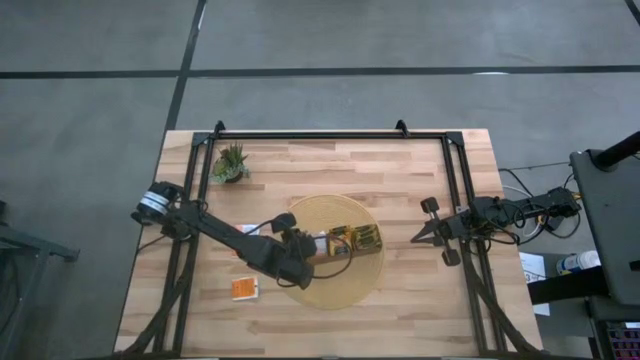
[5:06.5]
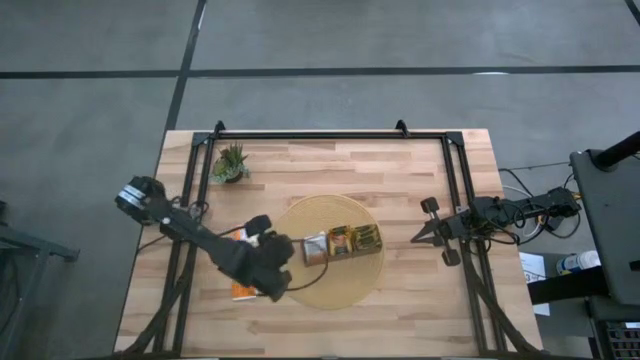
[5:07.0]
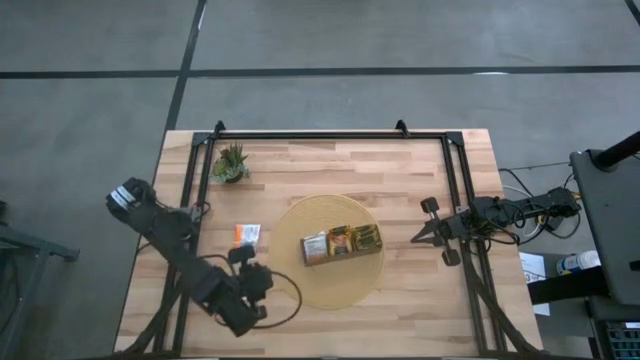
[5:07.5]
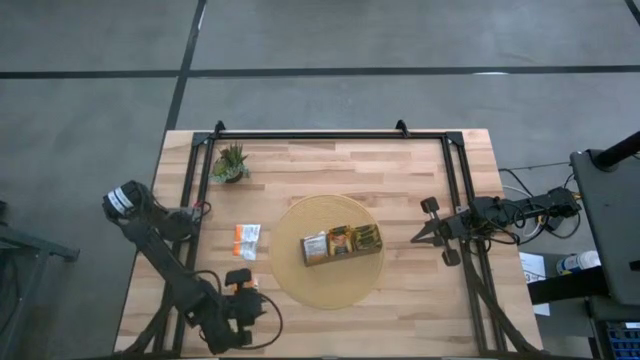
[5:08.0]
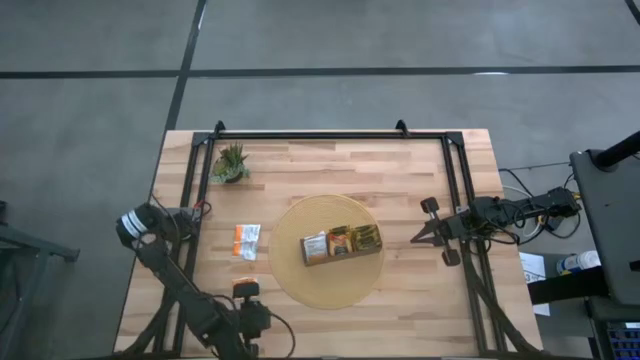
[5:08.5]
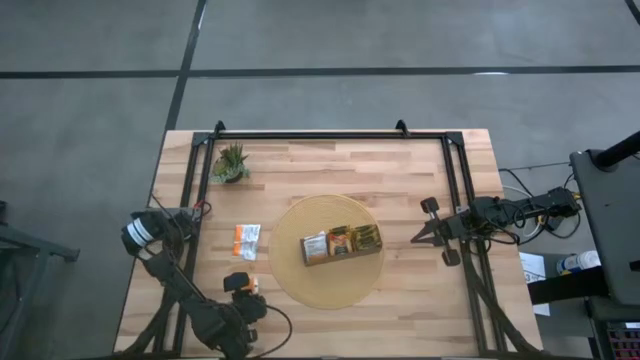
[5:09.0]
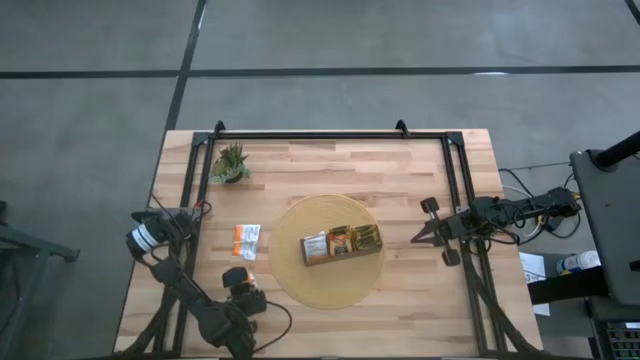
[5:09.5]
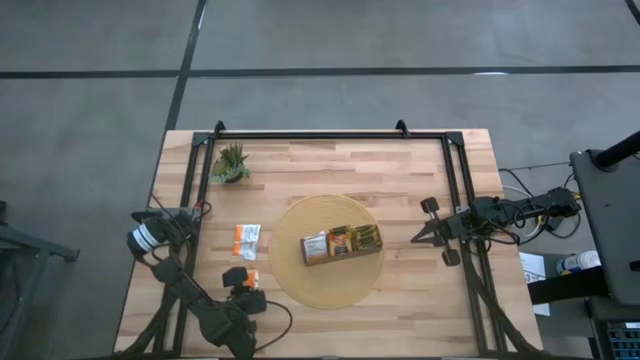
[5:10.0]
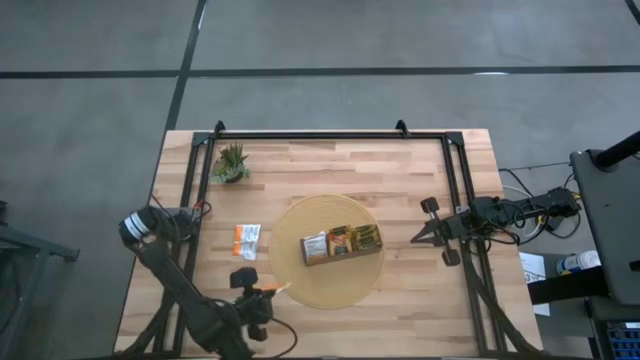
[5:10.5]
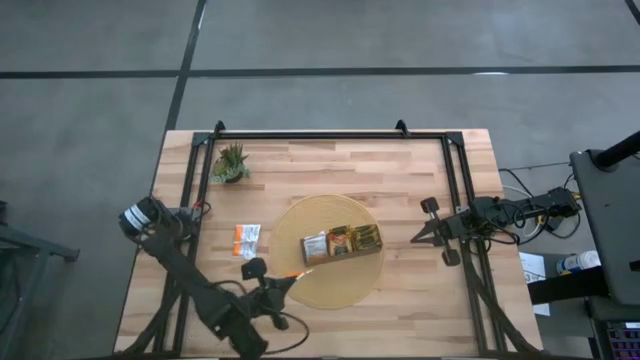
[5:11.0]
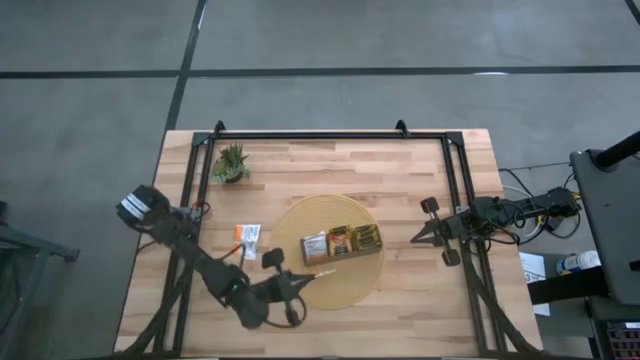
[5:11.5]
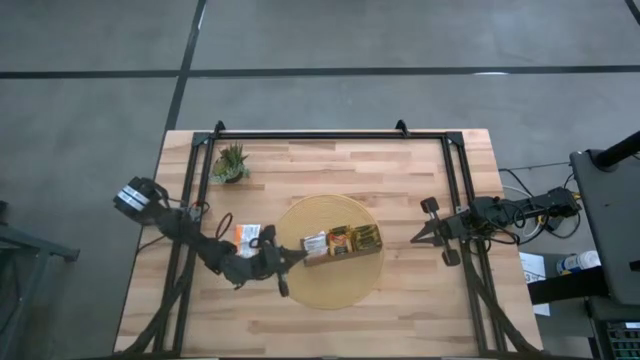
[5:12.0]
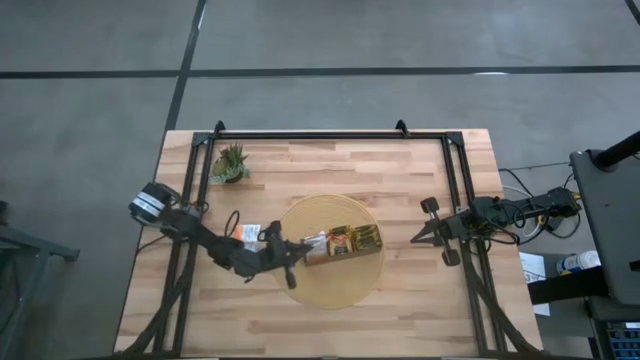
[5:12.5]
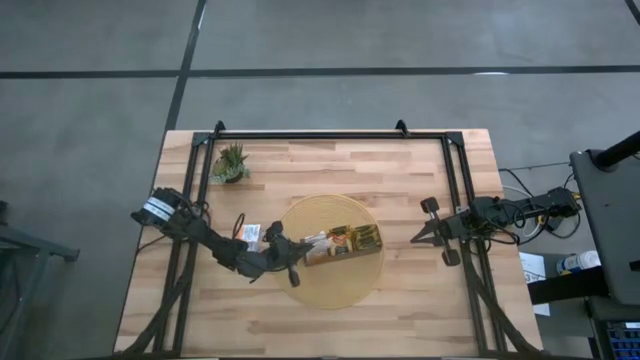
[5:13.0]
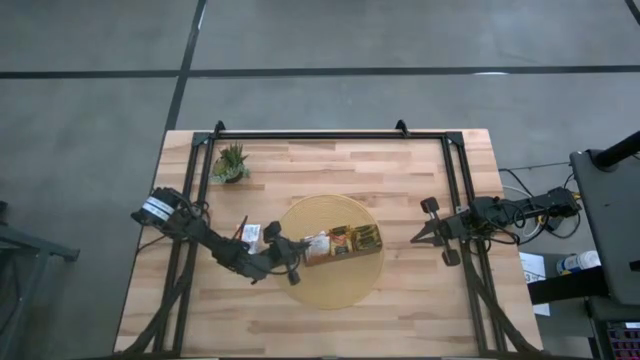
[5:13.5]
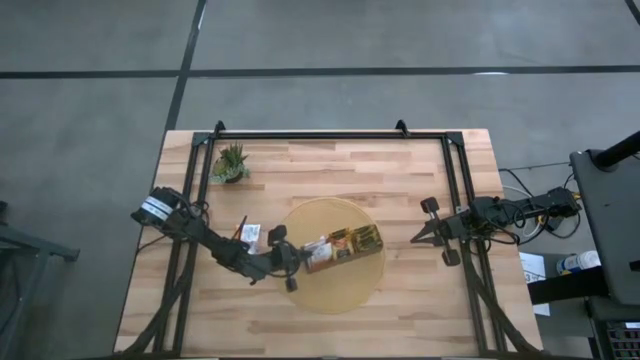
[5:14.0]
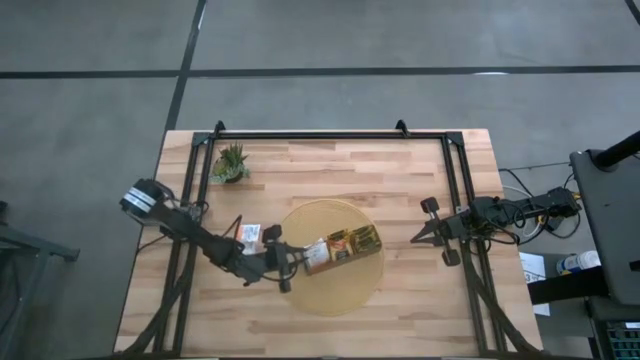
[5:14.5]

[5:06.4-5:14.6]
Task: Pick & Place Tea
Put the bottom white tea bag into the left of the wooden organizer

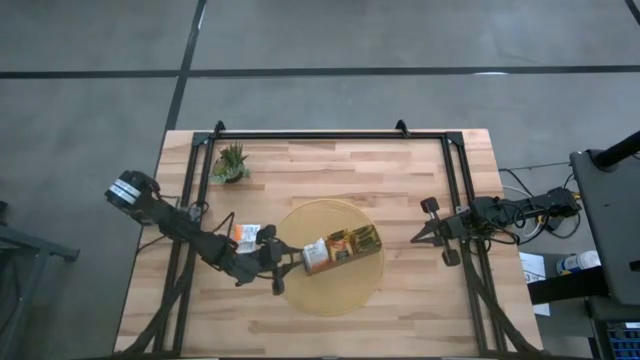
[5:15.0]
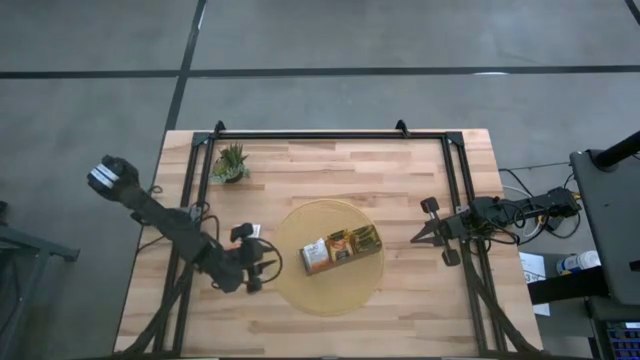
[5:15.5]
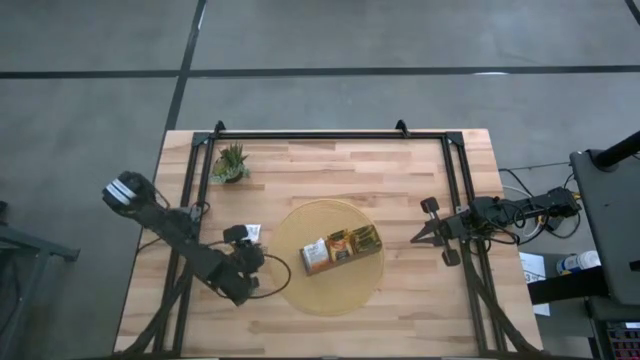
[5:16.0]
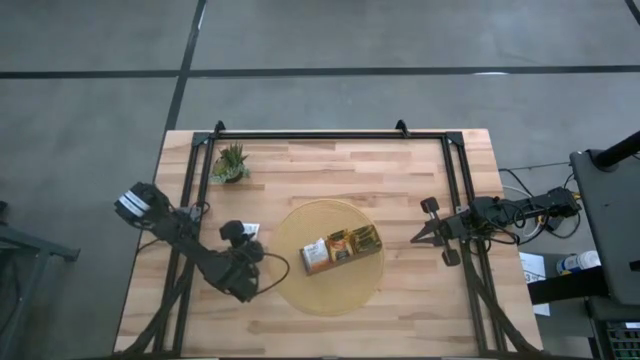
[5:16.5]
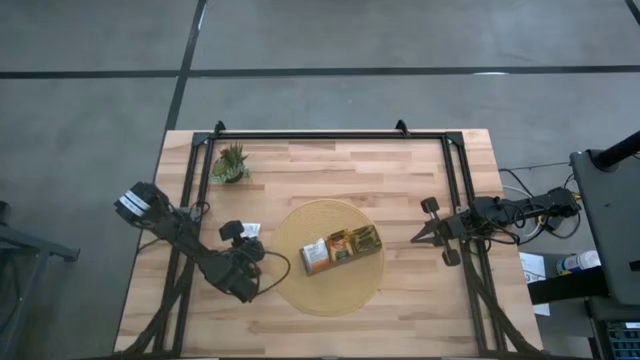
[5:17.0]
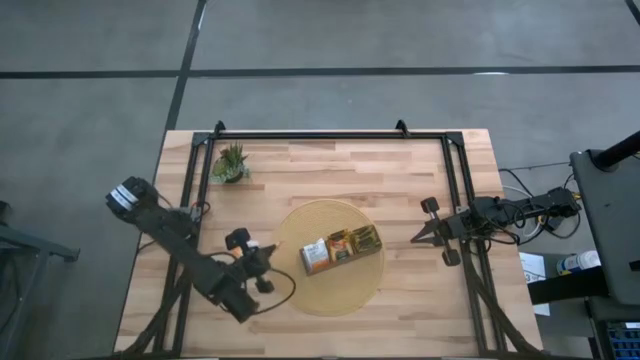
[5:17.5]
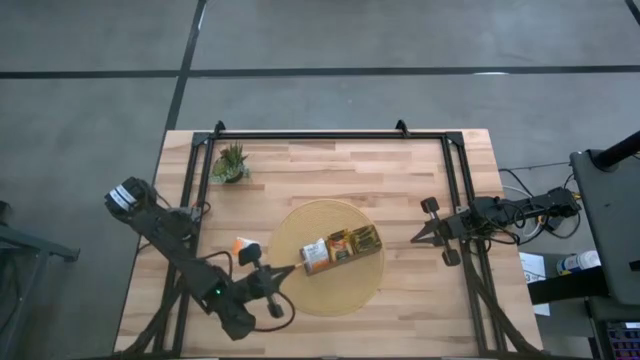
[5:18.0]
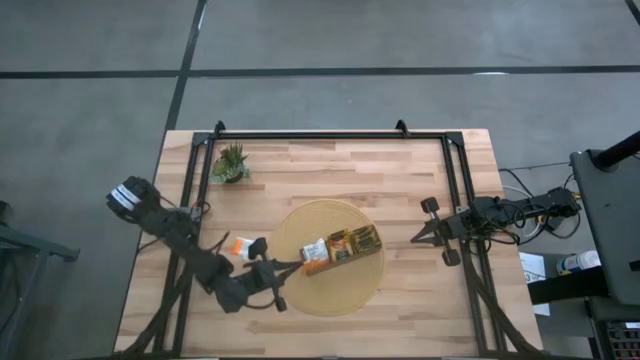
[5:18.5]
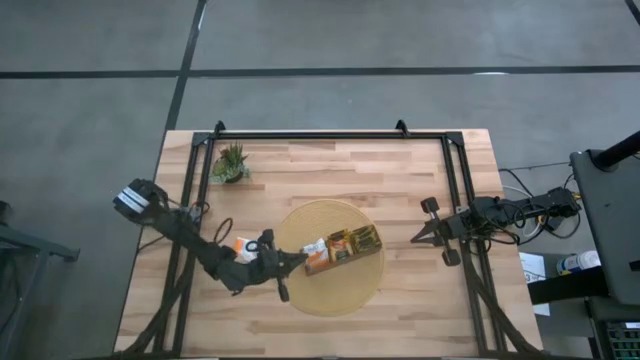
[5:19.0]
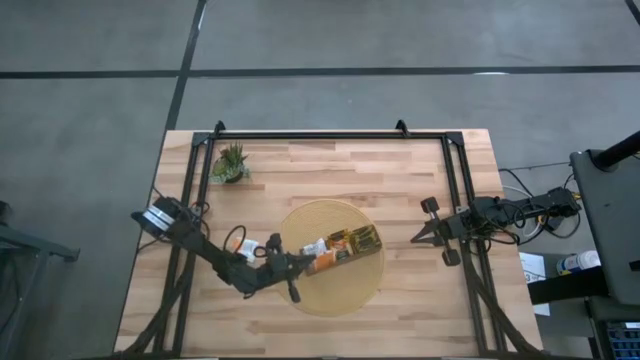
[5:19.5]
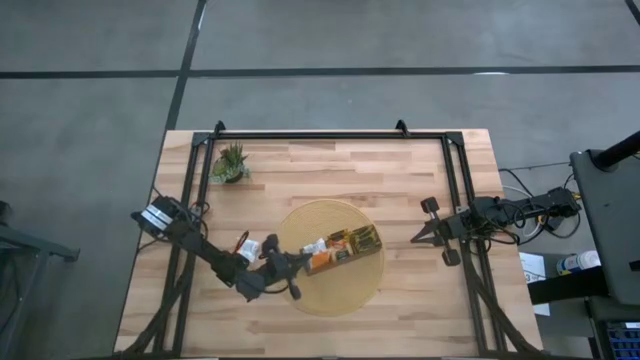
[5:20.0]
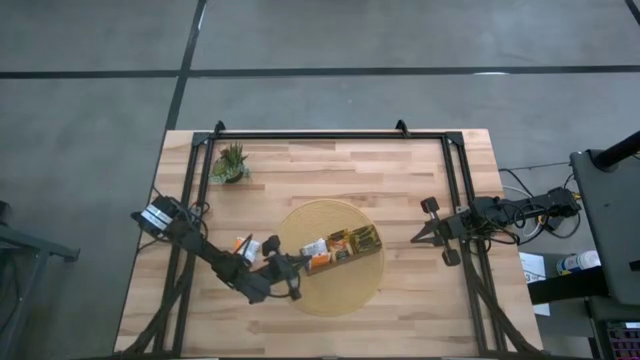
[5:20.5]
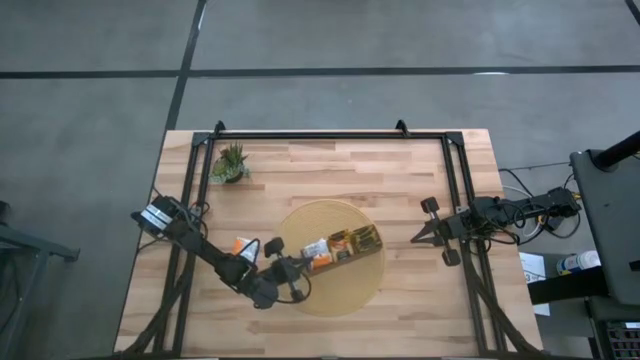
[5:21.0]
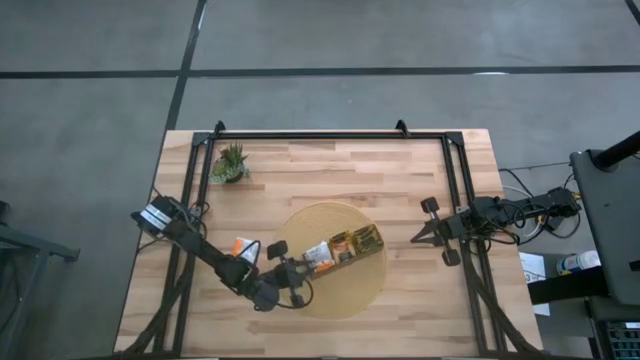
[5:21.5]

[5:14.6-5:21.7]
Put the top white tea bag into the left of the wooden organizer

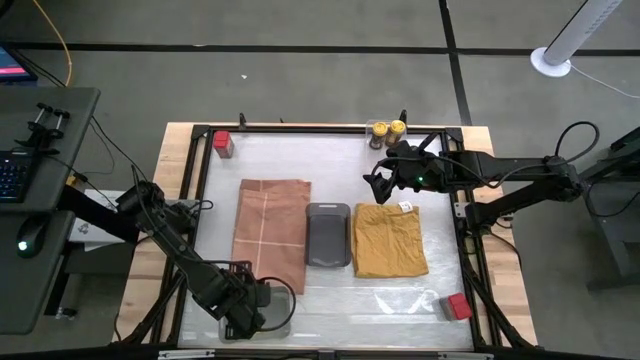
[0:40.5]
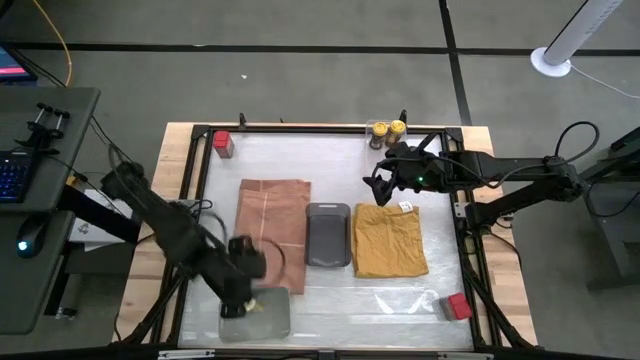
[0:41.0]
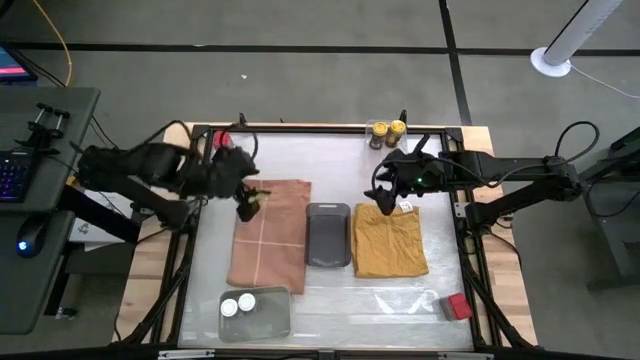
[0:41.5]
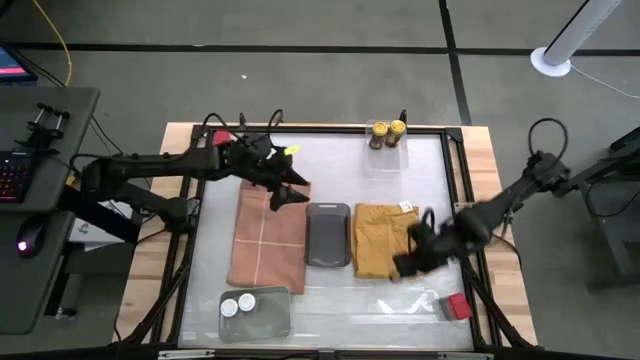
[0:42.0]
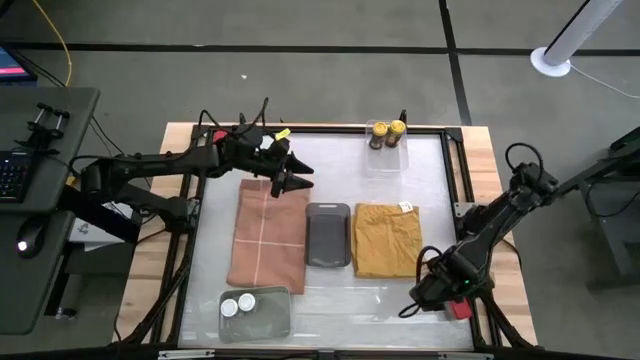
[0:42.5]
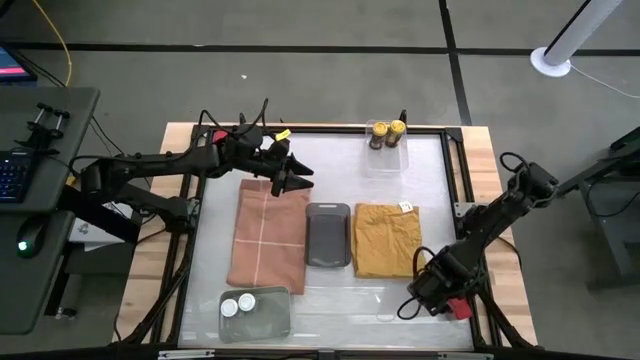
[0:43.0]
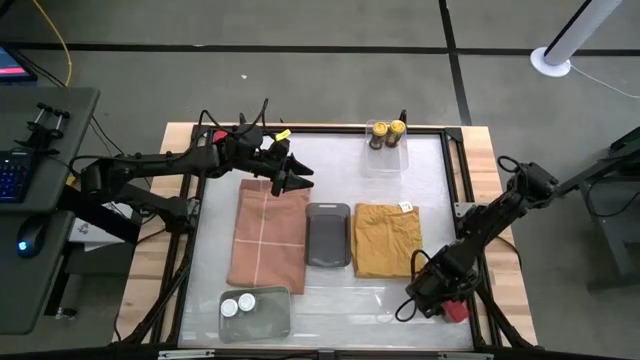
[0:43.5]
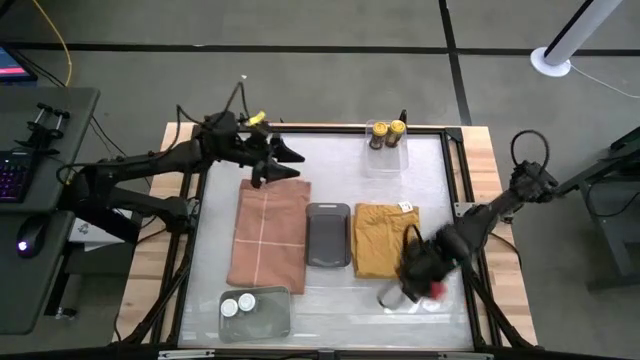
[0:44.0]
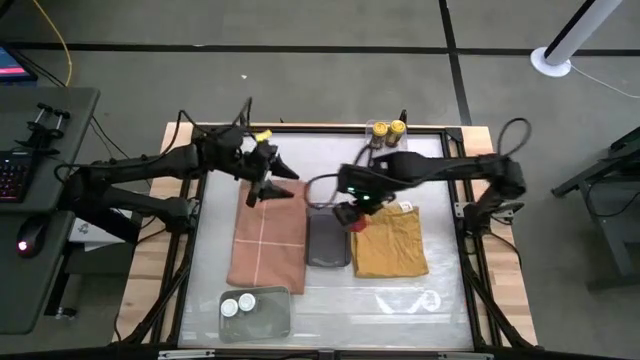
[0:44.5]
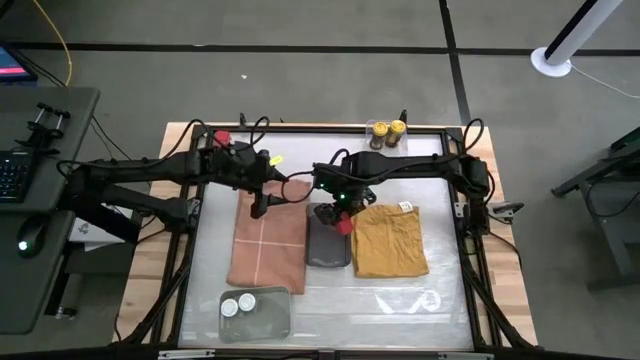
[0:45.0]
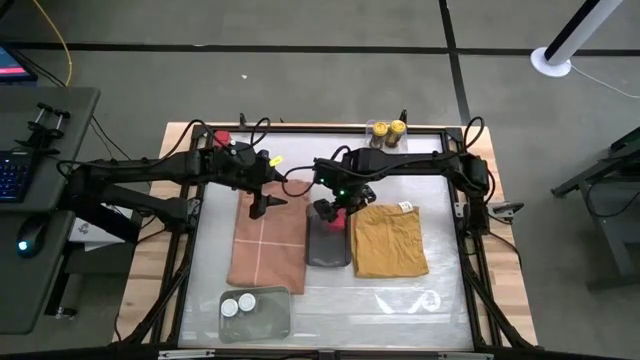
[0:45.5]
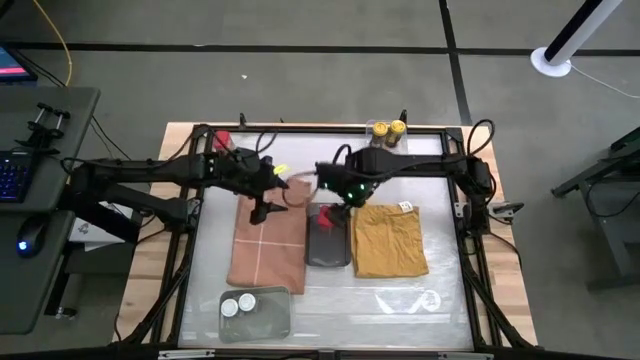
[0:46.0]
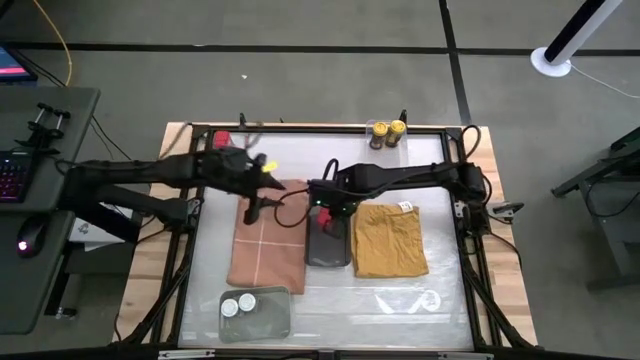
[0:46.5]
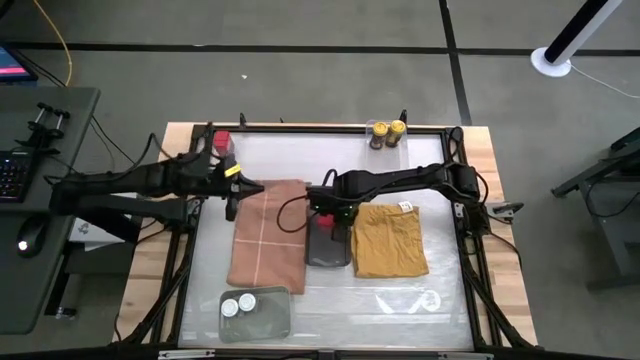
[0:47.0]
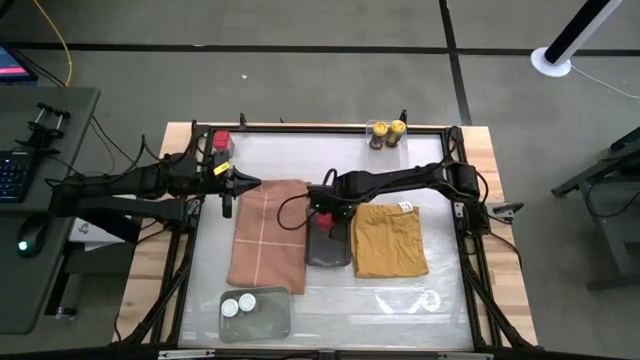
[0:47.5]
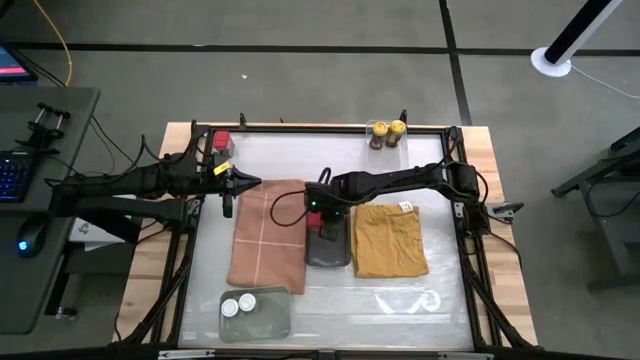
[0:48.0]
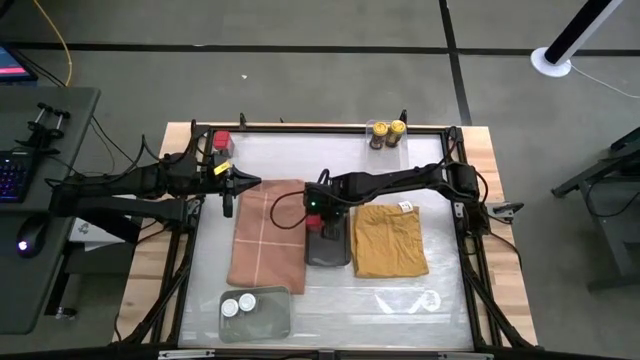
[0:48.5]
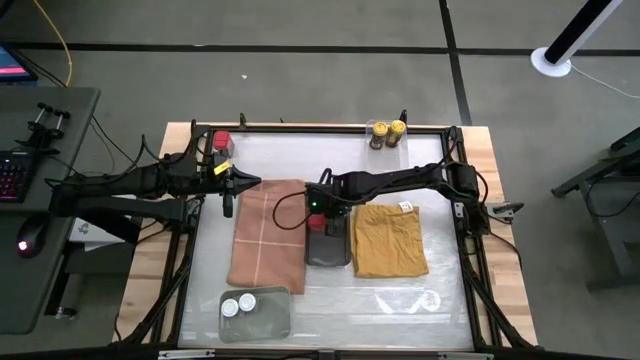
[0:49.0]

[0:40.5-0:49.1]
Task: Sort spices by type
Put the red seasoning can into the black bin
